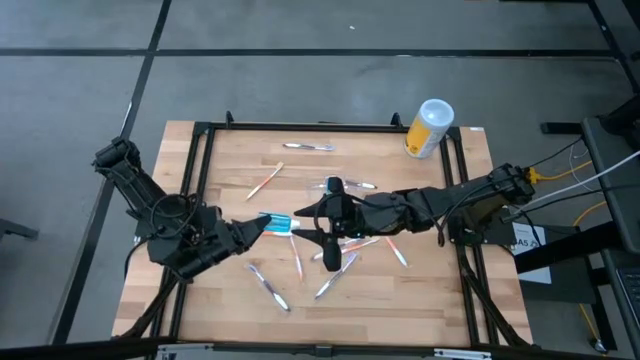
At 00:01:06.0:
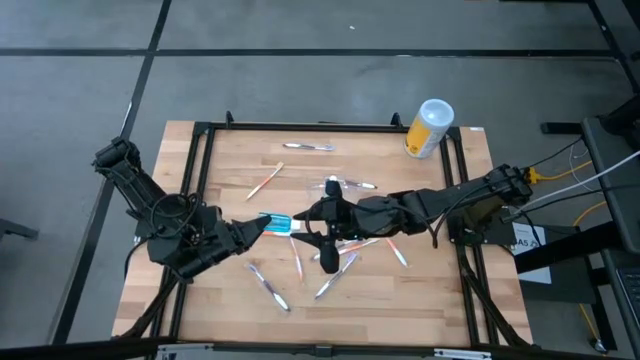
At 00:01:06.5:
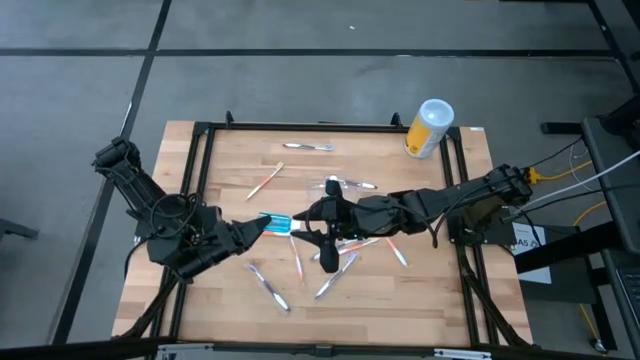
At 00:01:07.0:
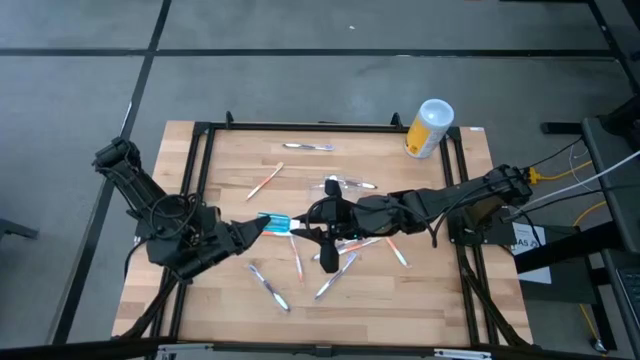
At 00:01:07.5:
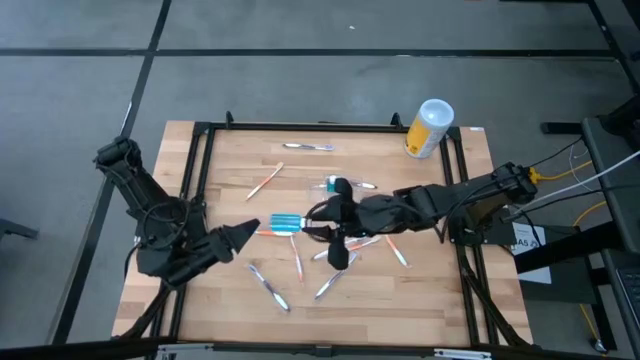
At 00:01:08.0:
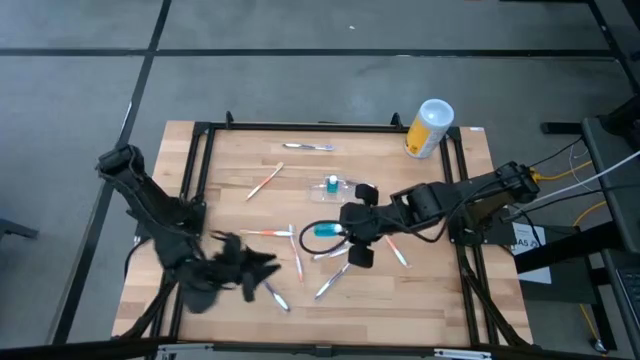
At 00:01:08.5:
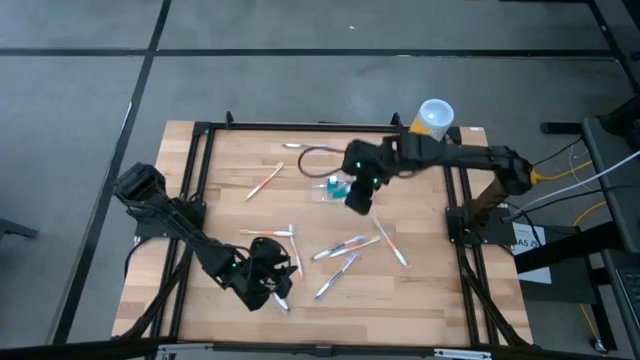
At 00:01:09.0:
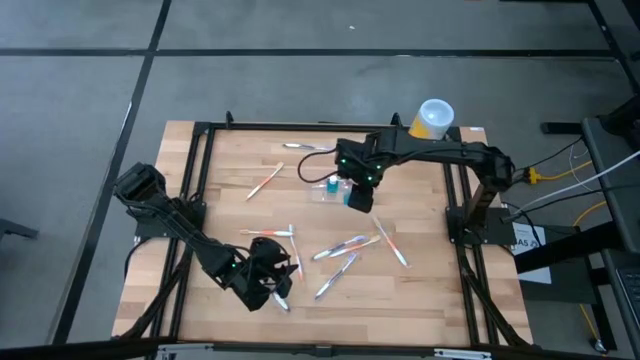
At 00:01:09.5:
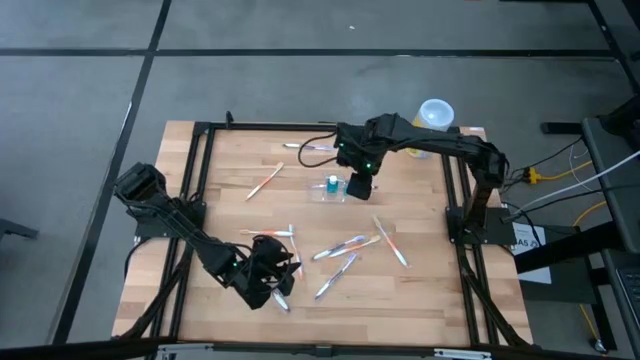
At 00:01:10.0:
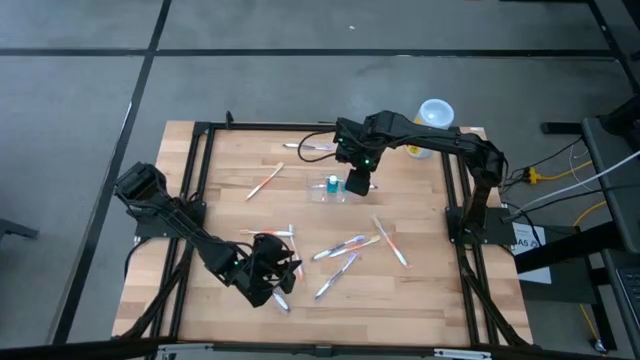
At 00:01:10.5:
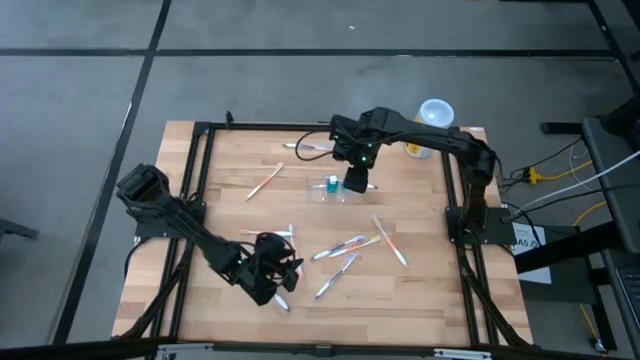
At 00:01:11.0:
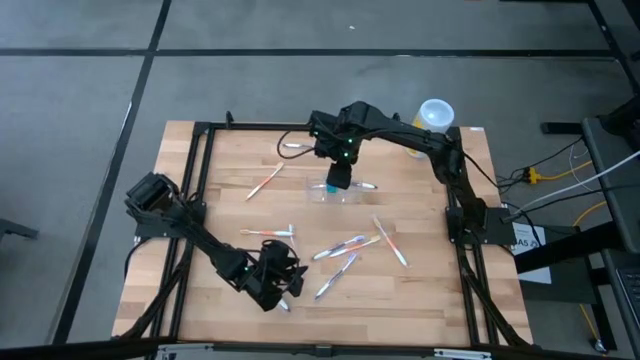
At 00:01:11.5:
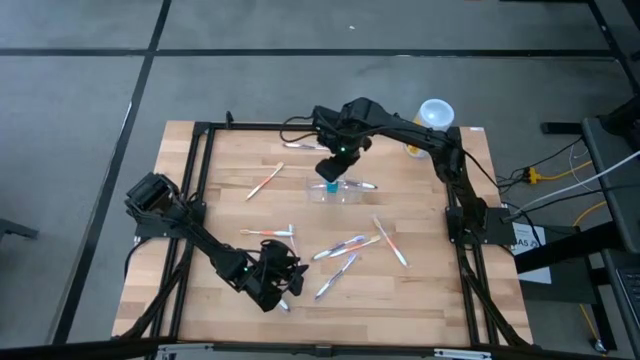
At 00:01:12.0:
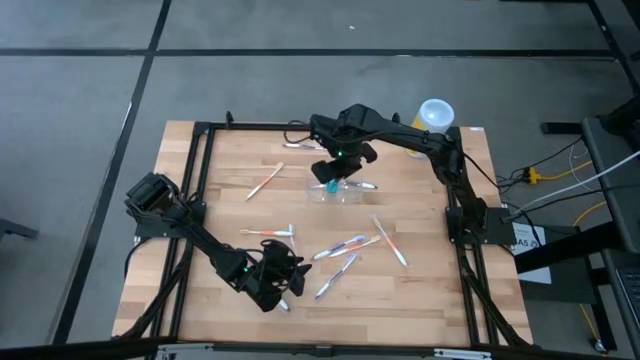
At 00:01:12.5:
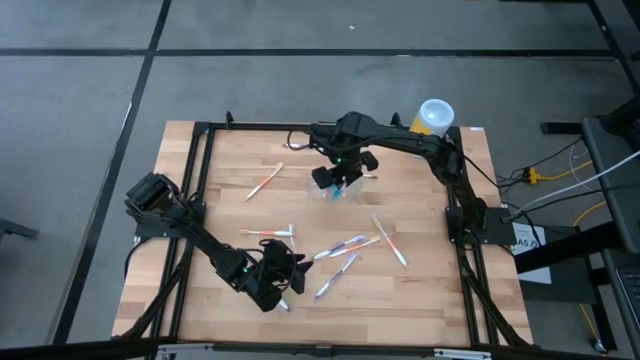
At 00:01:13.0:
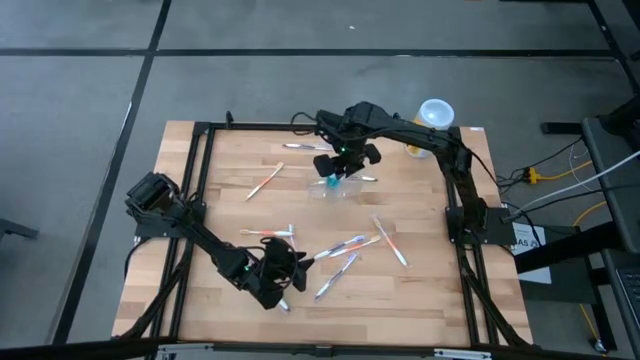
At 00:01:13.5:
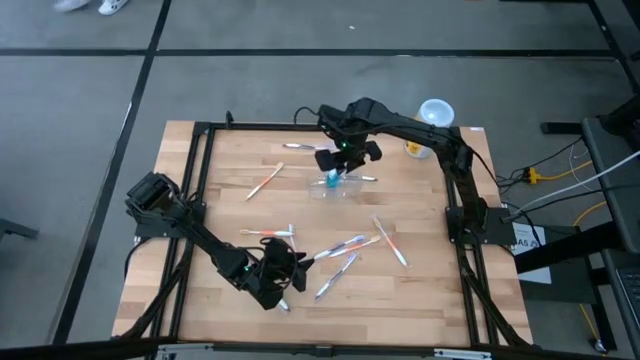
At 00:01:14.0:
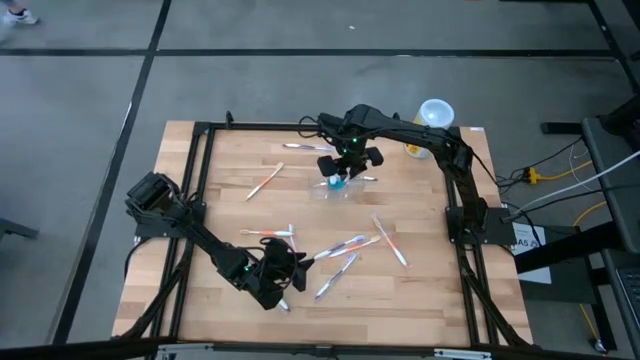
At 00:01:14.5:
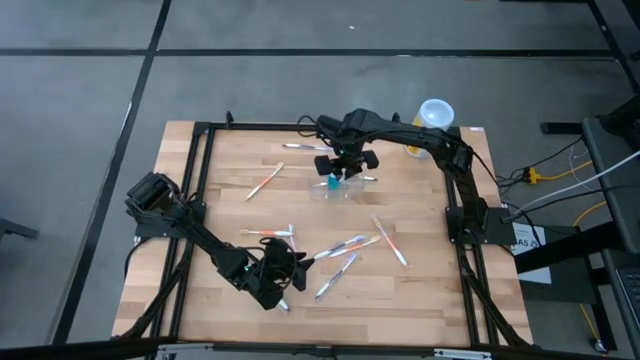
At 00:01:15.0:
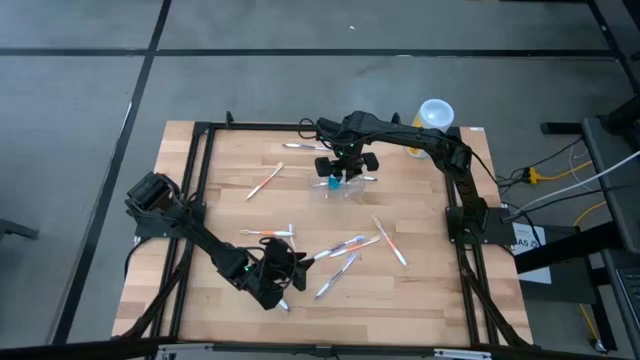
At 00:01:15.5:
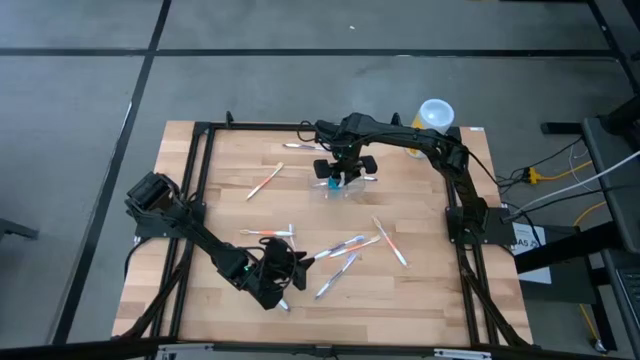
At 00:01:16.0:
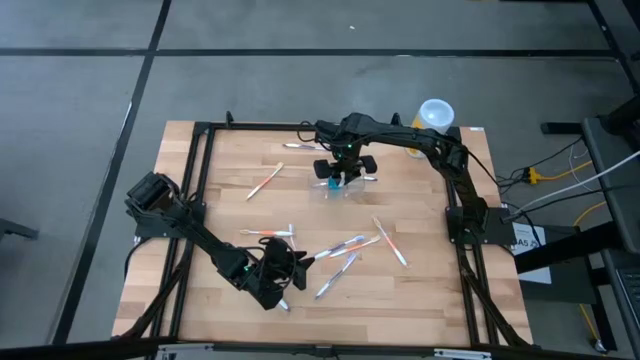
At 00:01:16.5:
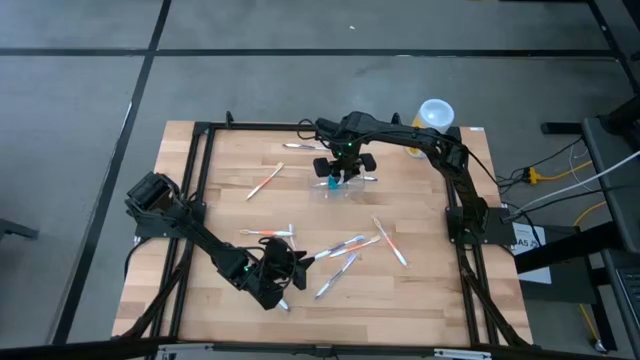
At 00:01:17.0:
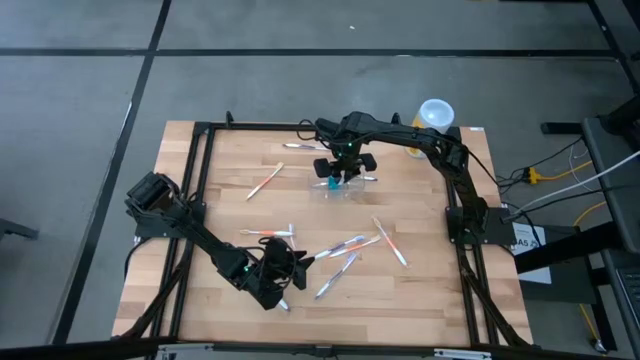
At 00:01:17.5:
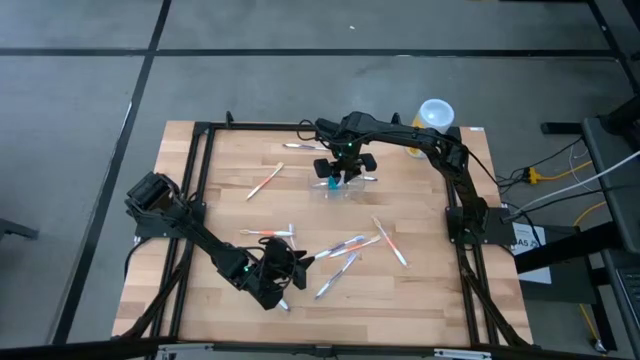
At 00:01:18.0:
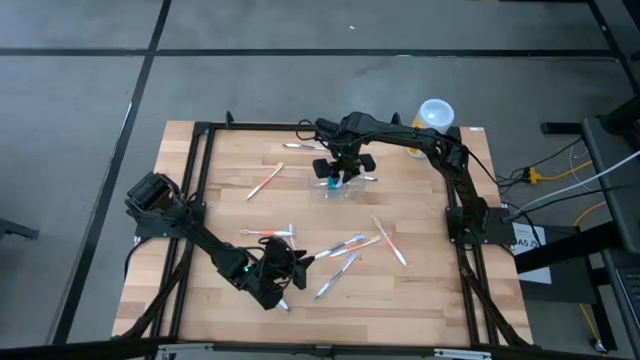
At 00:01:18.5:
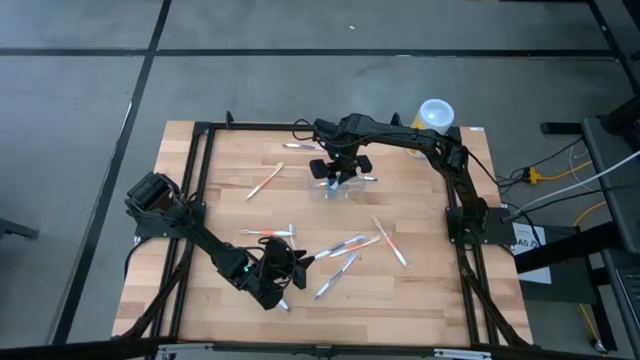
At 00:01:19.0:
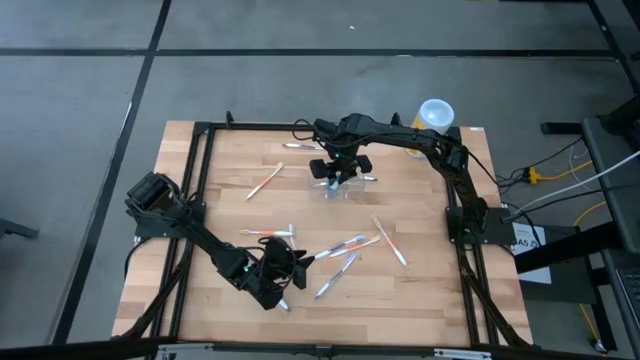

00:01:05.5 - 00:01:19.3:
Task: Pick & Place toothbrushing station
Put the blue mouthwash into the middle section of the transparent organizer

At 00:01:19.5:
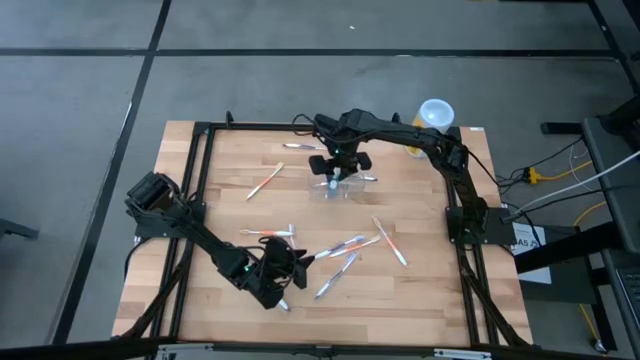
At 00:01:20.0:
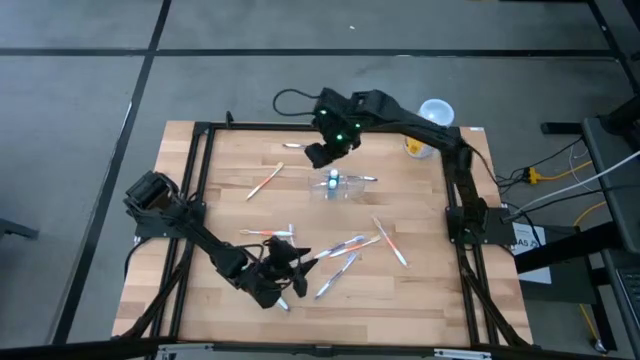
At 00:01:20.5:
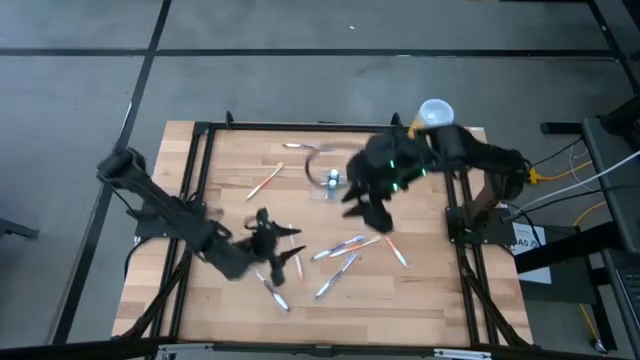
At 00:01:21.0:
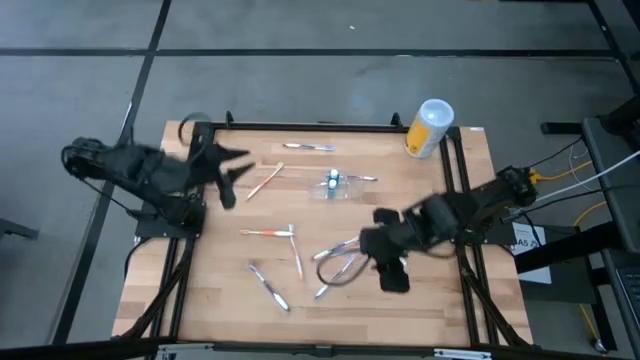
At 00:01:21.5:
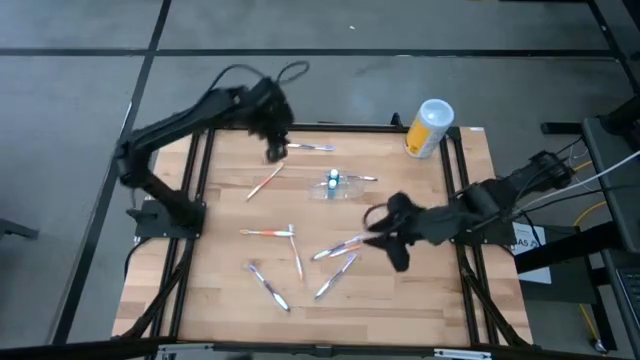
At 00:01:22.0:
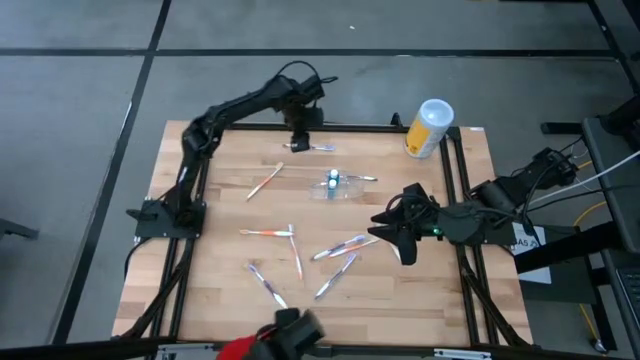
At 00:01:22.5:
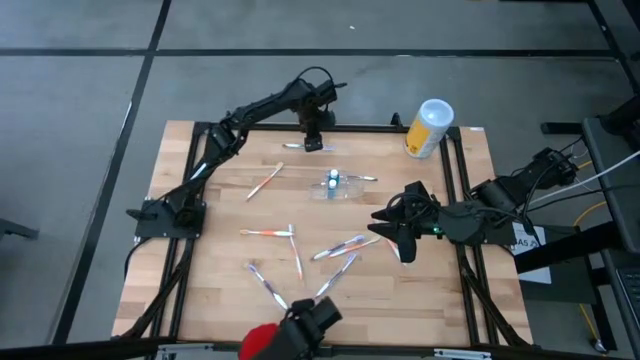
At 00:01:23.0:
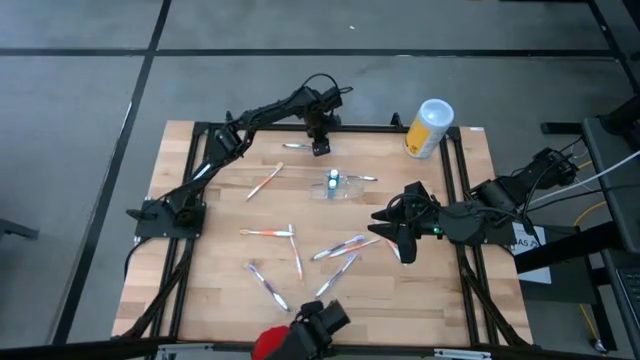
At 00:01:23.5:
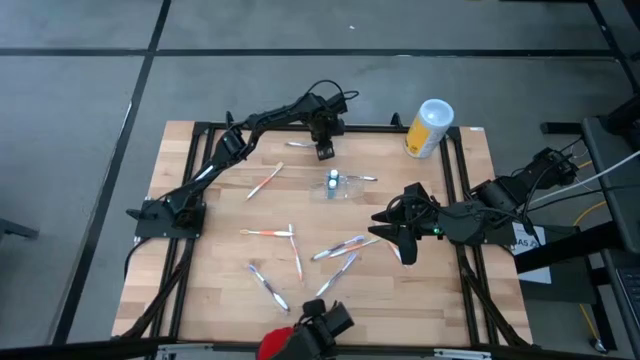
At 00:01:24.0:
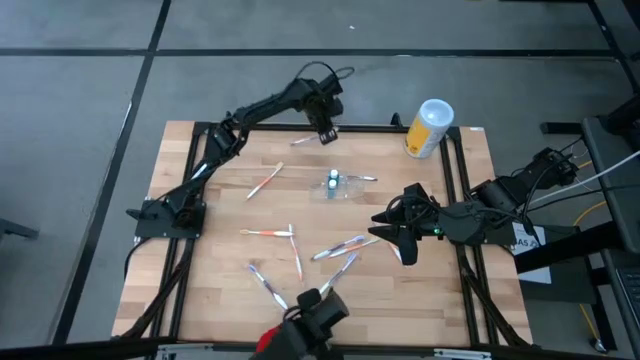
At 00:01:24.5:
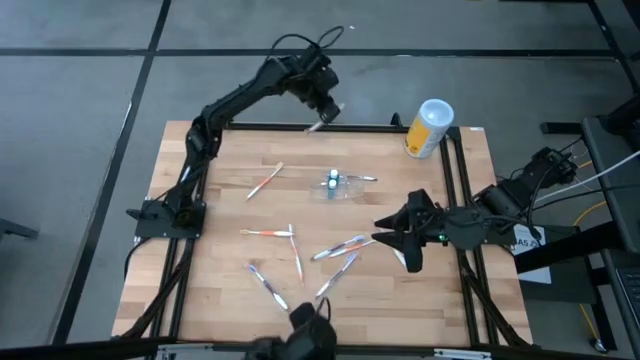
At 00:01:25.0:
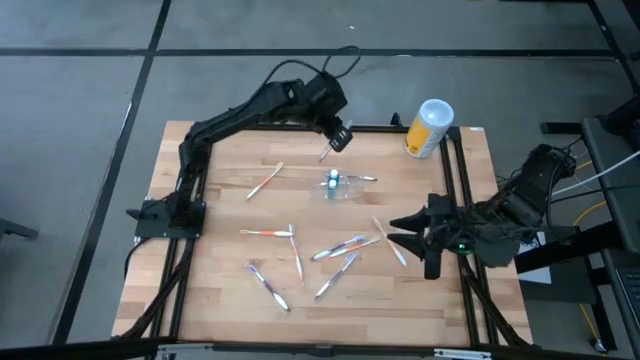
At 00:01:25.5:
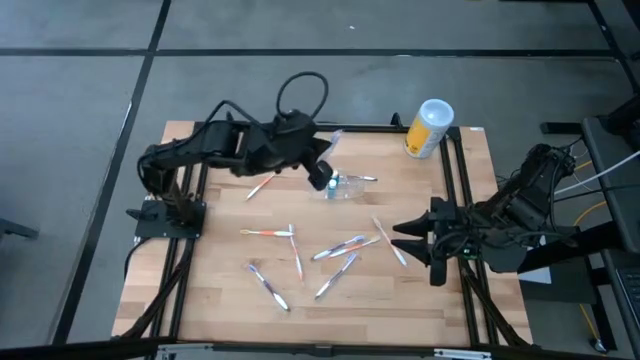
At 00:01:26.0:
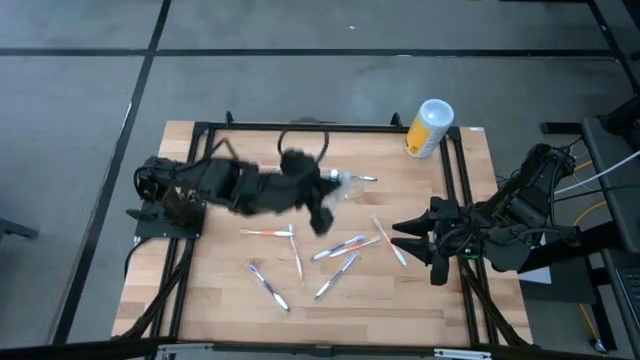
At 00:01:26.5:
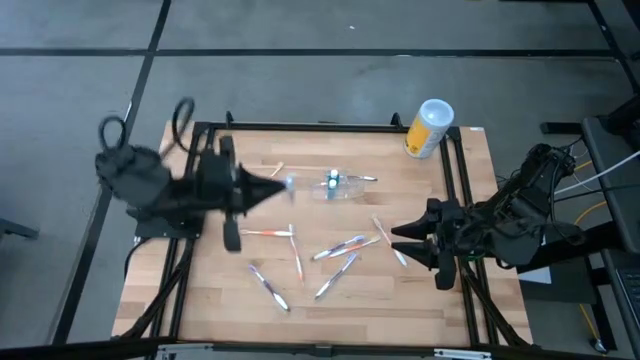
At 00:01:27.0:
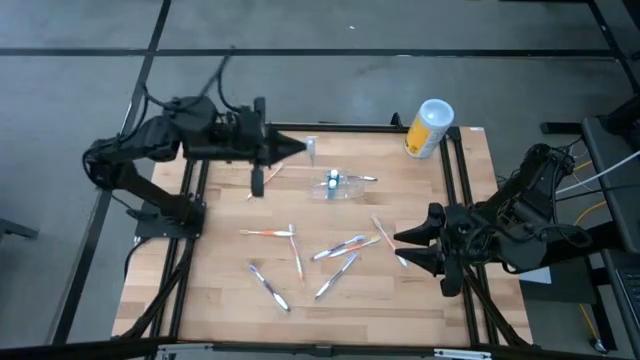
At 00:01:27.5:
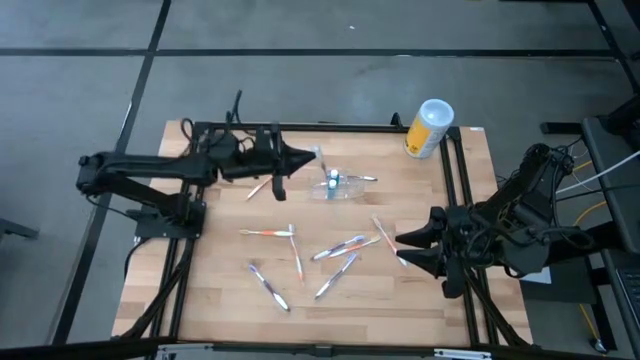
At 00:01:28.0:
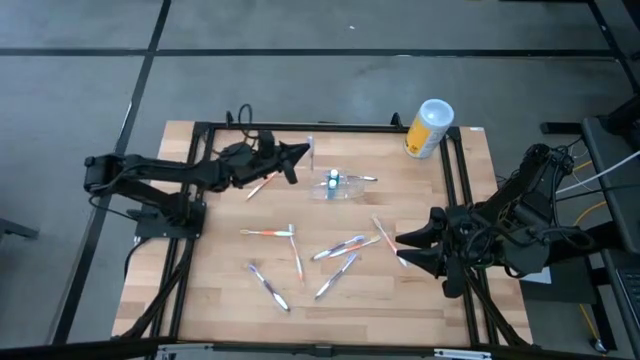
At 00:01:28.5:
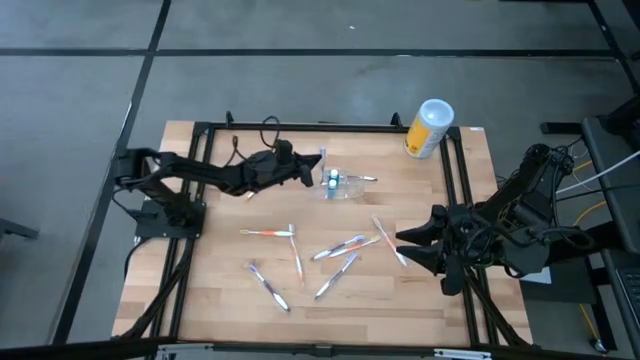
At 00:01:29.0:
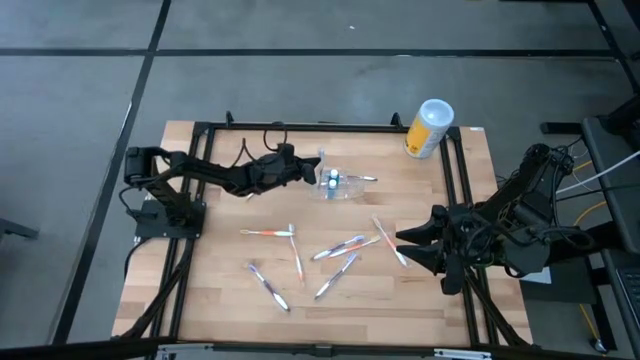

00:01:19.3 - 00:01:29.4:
Put the purple toothbrush into the left section of the transparent organizer
